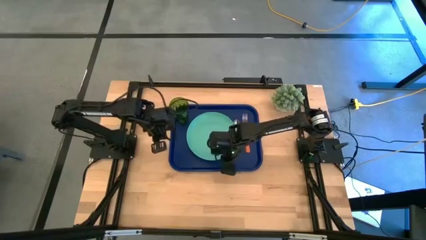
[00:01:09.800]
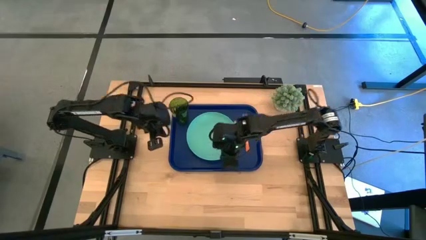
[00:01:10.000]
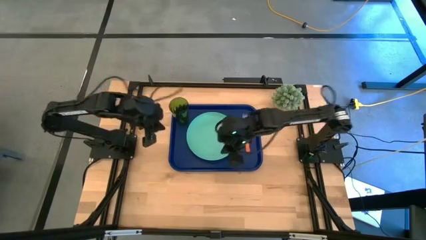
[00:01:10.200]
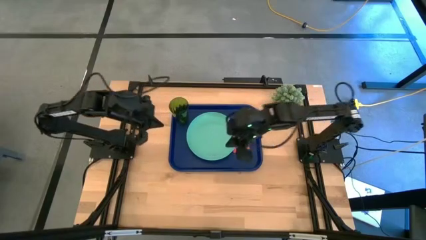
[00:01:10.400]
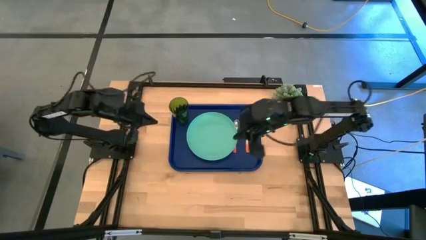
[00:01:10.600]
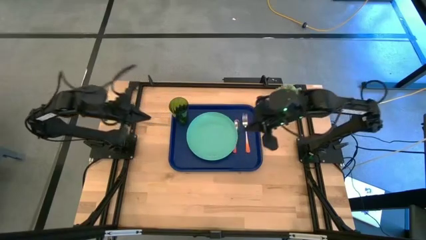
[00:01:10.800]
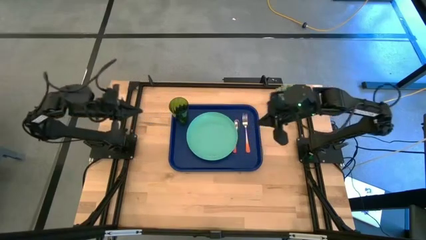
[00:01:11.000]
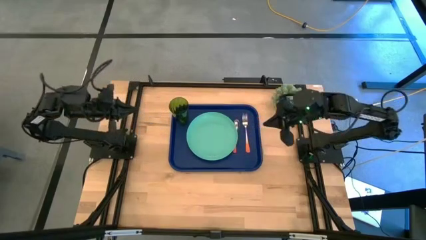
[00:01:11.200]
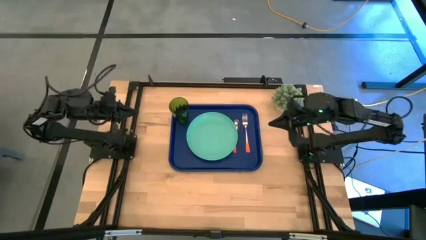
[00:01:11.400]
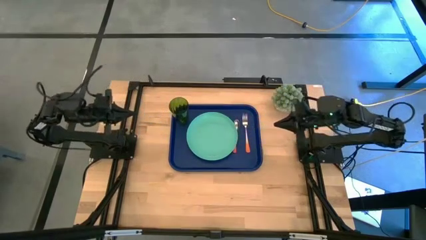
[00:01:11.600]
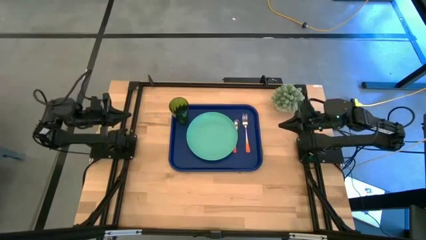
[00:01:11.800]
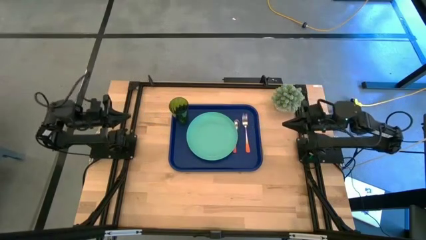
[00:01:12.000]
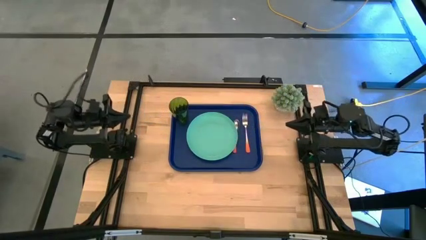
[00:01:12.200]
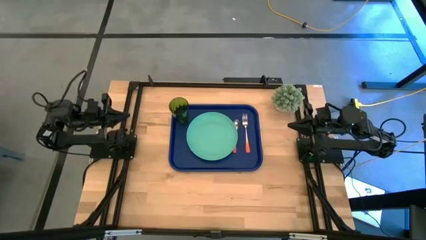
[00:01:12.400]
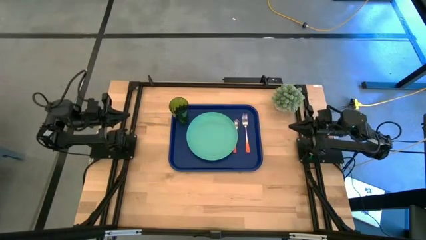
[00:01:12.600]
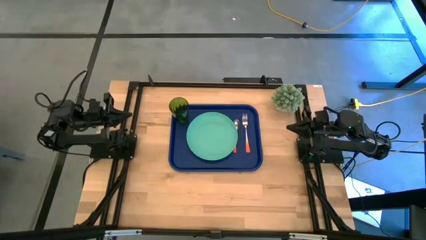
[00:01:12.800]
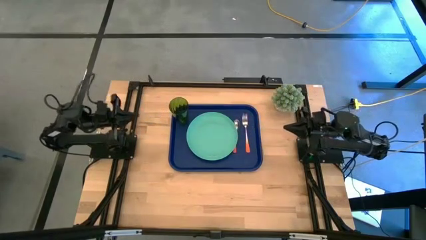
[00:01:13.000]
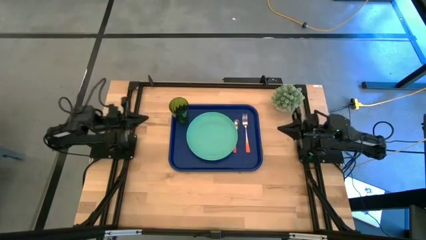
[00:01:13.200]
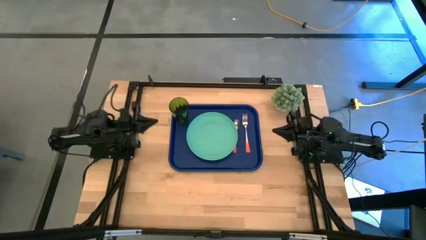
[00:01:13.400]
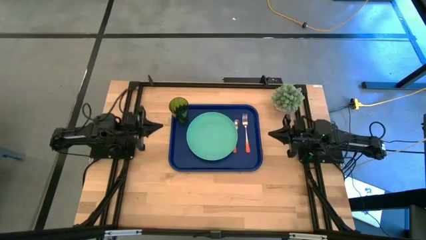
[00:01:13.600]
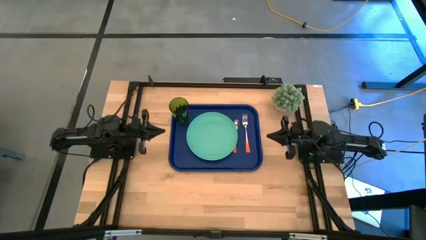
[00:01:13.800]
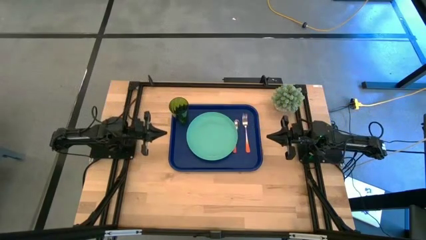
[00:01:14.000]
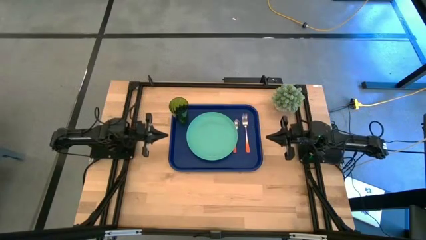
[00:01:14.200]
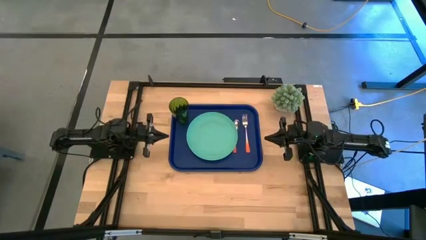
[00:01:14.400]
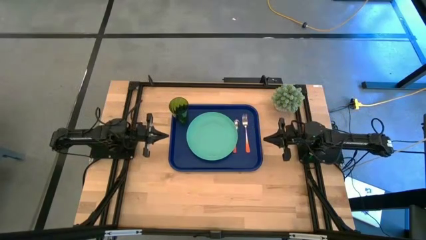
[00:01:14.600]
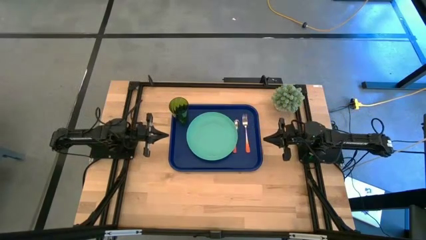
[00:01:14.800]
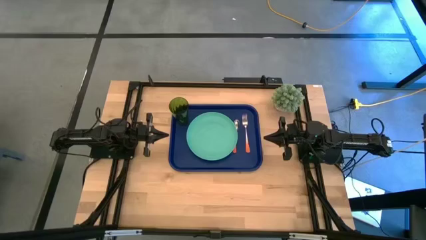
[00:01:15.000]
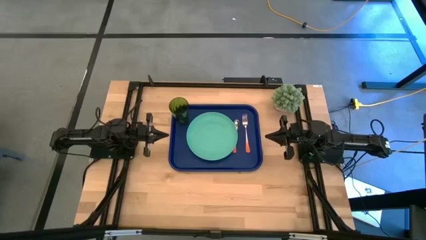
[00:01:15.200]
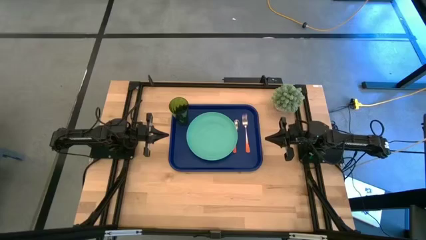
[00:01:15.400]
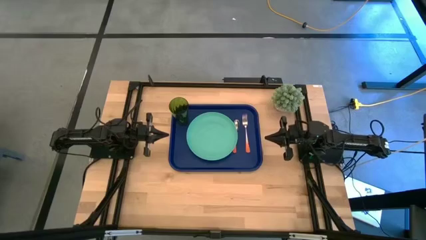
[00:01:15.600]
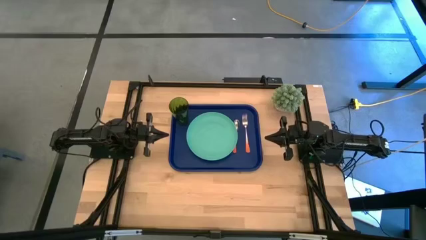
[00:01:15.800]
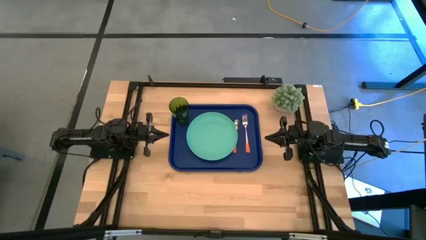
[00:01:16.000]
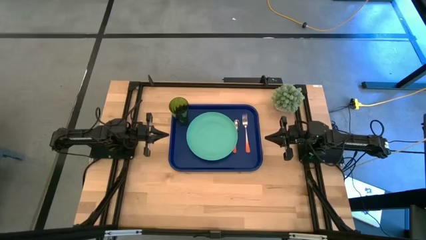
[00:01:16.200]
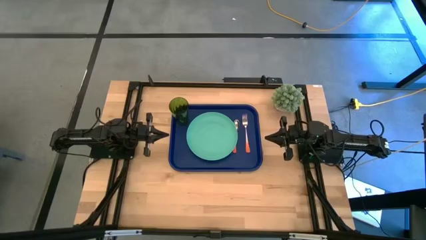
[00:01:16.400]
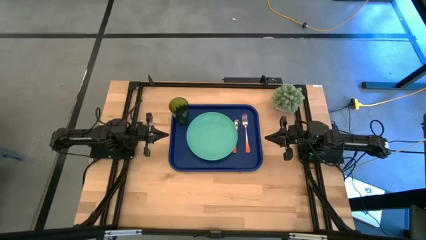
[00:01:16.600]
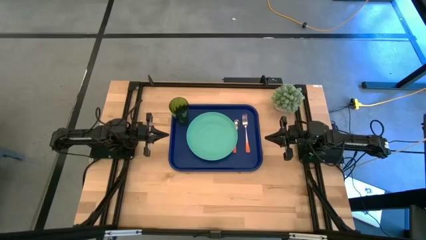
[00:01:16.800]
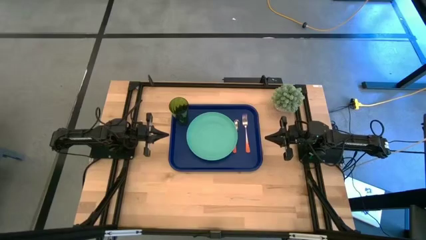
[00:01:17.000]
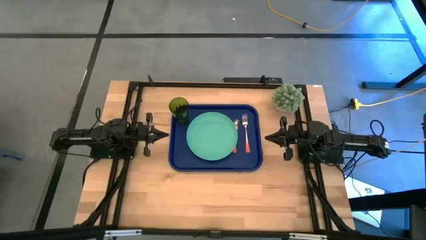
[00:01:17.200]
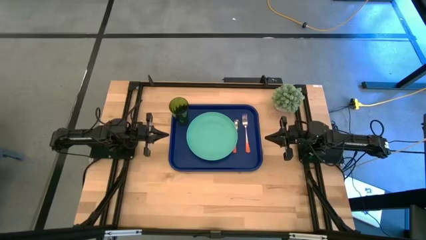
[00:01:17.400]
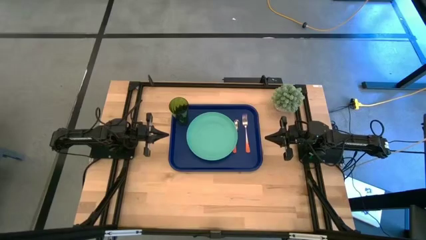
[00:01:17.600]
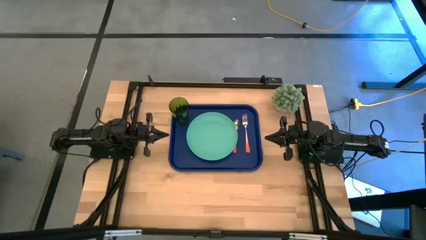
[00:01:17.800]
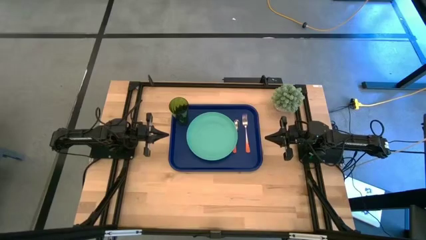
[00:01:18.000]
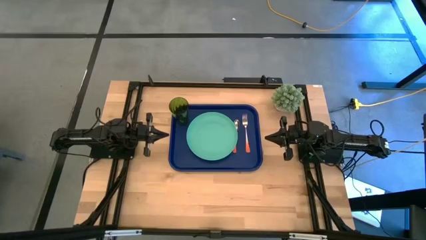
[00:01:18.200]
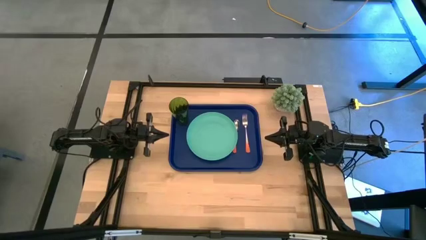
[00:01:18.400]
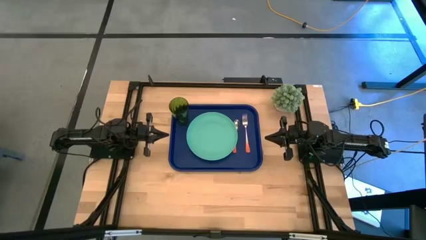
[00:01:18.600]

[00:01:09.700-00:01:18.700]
Task: Pick and place plate/cup/fork/spoon on tray
Return to Home Position

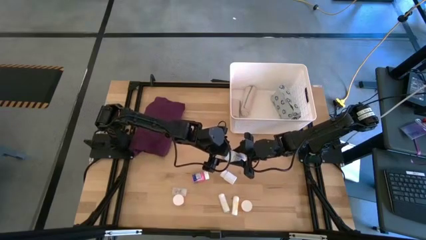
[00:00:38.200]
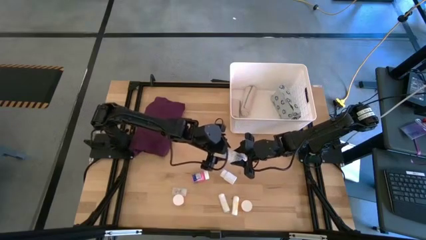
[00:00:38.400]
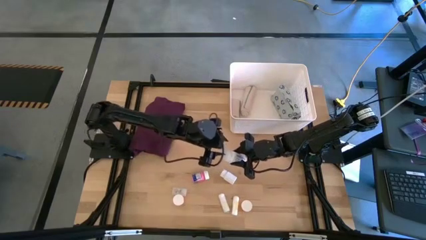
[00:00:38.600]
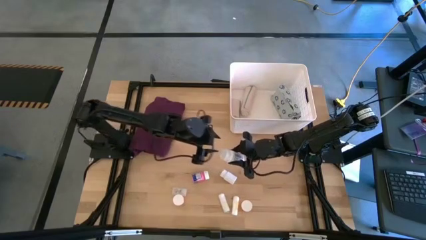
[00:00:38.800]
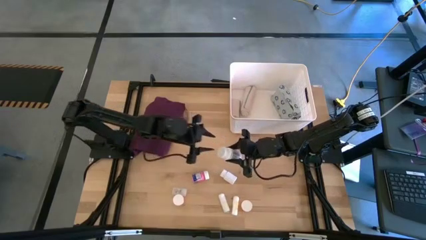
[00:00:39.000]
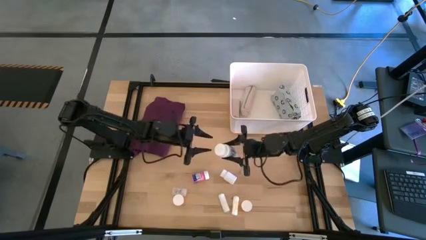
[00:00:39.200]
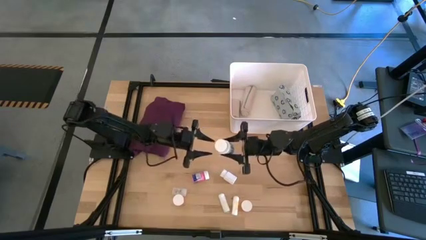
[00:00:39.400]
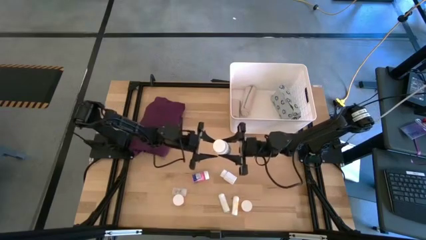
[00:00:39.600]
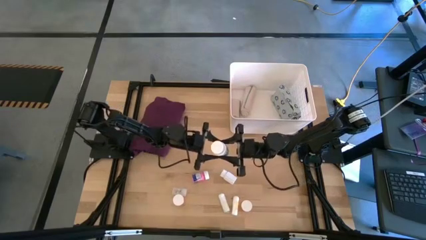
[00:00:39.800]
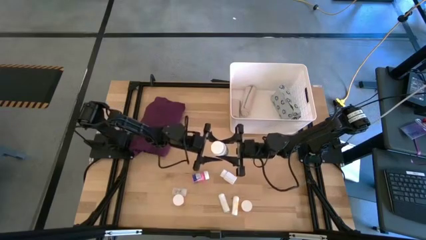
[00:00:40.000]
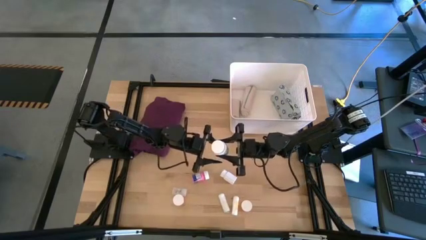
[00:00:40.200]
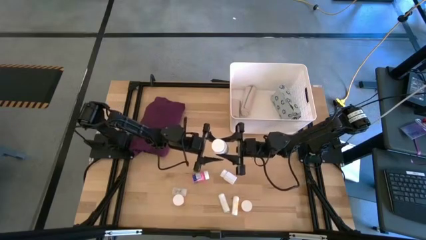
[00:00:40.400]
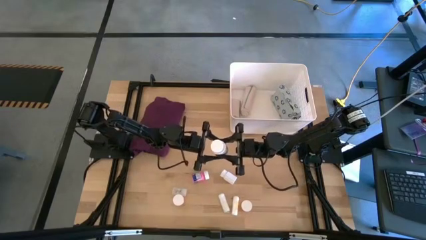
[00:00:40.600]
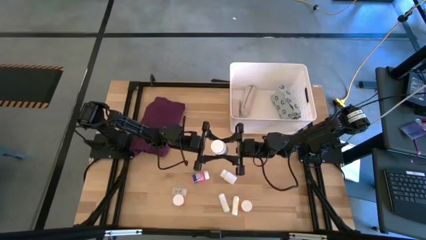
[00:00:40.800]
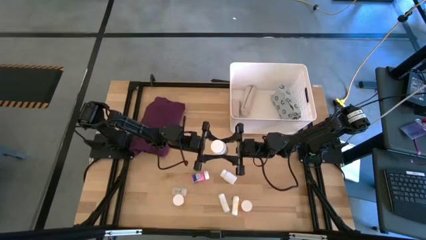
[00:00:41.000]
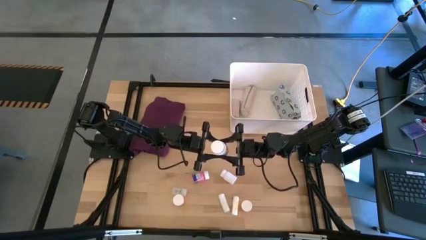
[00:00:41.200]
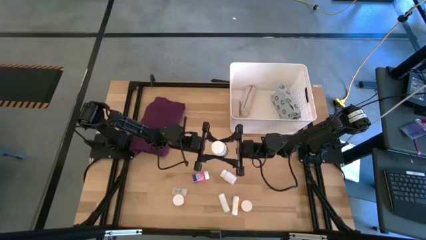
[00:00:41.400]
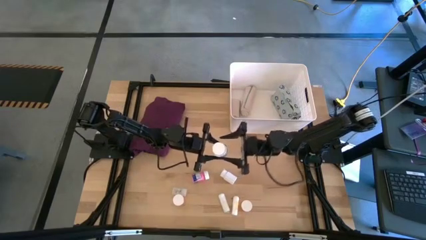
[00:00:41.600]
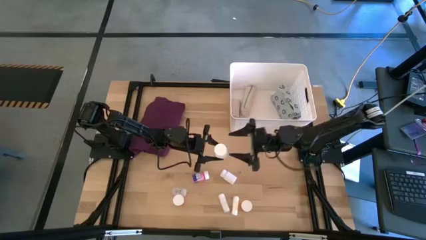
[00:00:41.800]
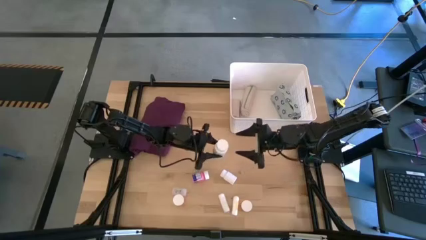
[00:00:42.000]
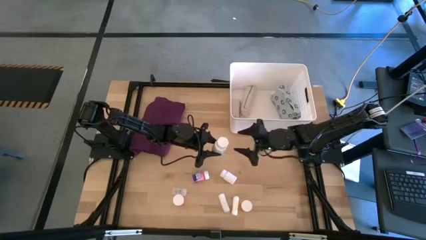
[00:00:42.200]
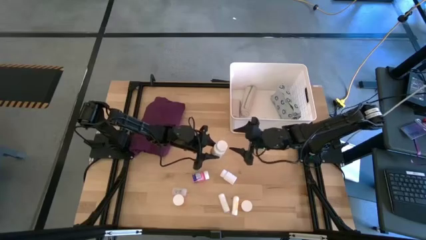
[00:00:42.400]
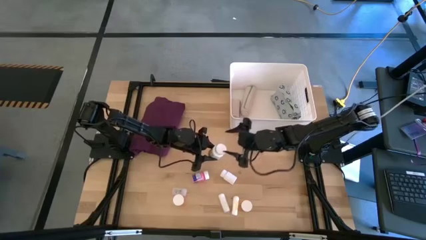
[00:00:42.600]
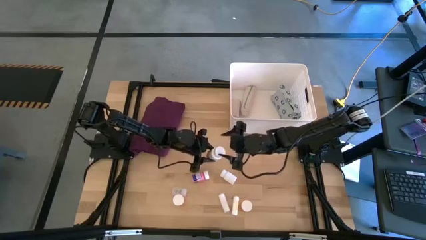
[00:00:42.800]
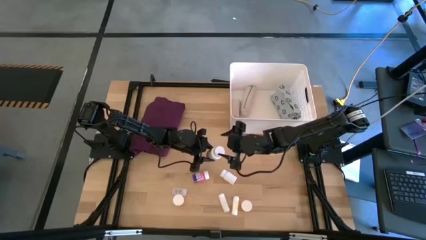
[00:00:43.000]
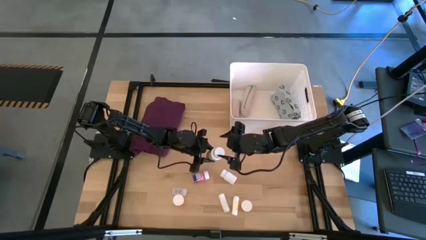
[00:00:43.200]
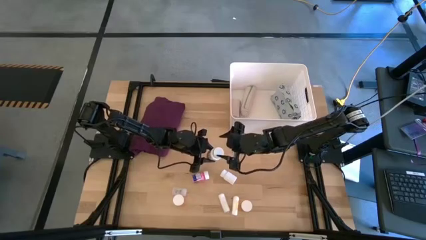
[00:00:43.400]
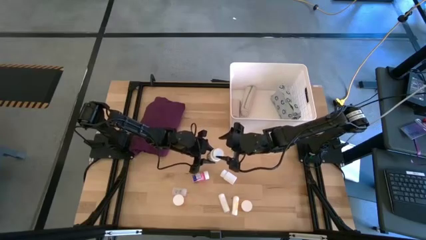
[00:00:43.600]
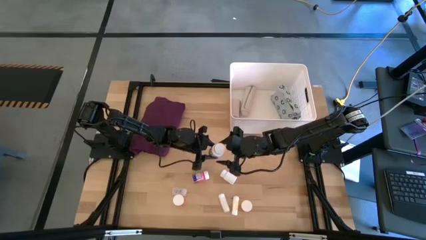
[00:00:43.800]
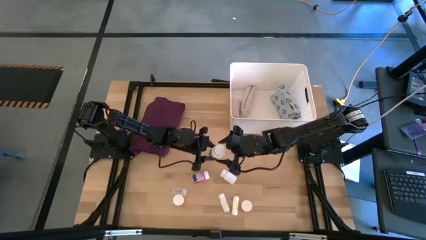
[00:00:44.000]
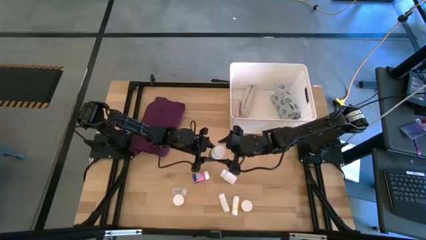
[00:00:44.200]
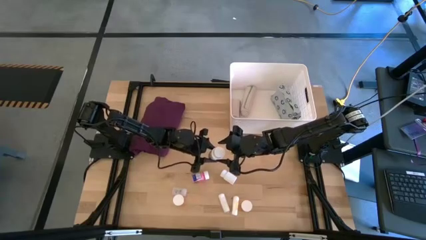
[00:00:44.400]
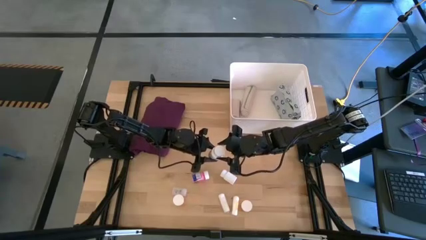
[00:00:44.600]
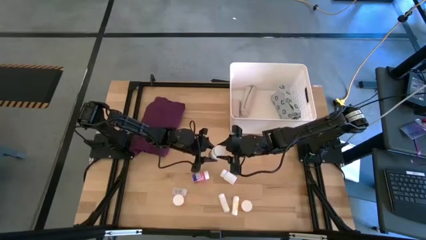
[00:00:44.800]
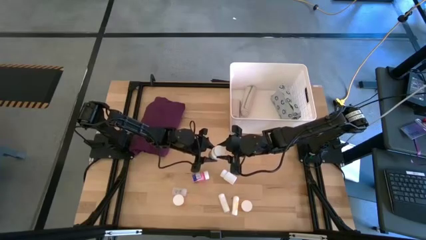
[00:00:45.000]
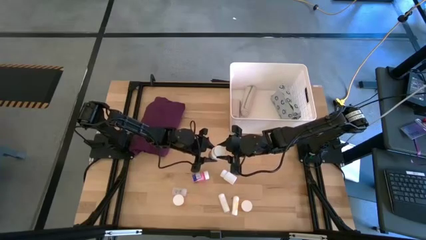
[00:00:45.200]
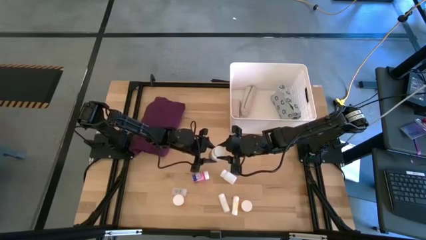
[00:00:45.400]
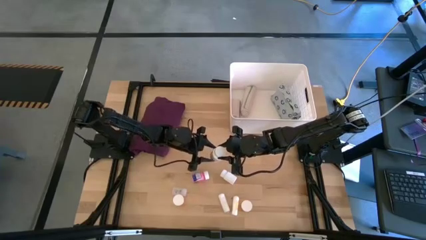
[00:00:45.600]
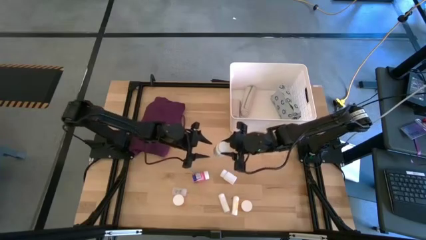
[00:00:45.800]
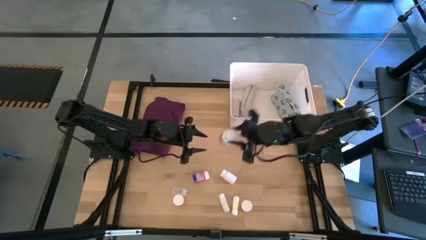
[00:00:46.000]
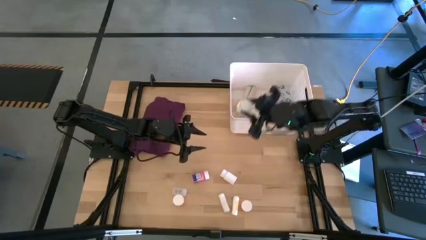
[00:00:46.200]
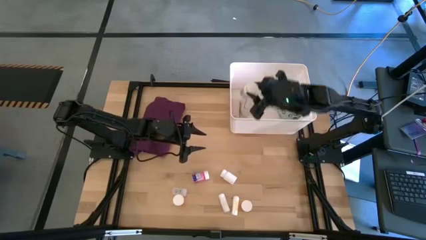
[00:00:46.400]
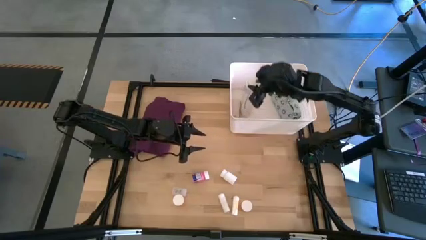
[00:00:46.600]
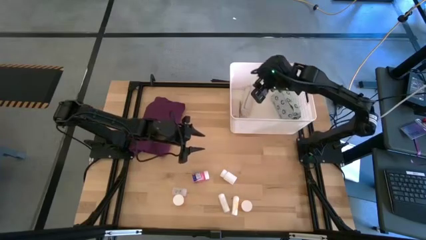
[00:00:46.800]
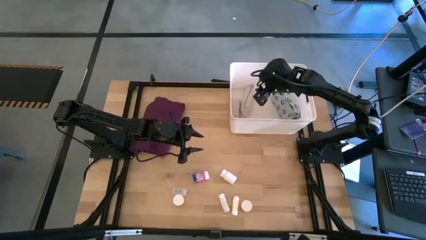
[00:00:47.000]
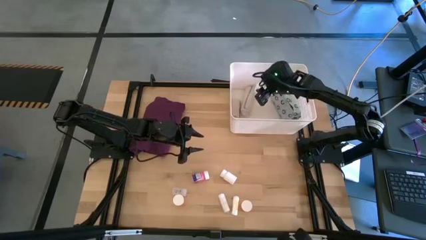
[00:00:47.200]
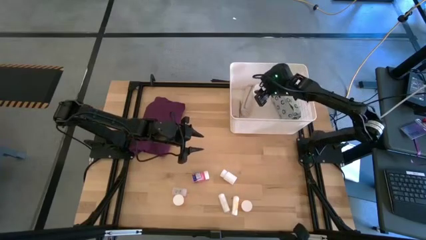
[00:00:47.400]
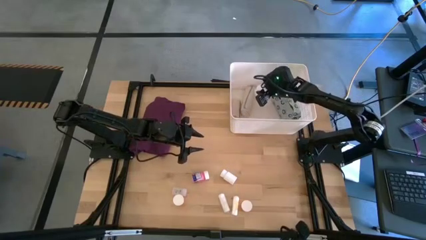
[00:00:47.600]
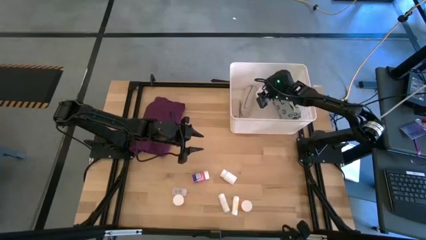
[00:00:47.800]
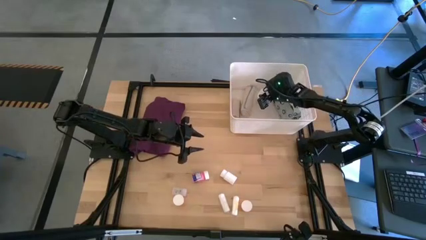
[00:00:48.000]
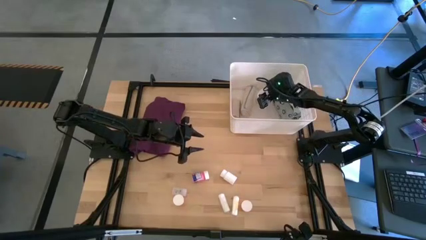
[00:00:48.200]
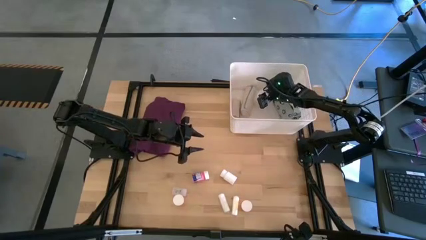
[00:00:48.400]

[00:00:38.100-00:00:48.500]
Task: Pick & place medical supplies in basket/bin
Put the left white pill bottle into the white bin
